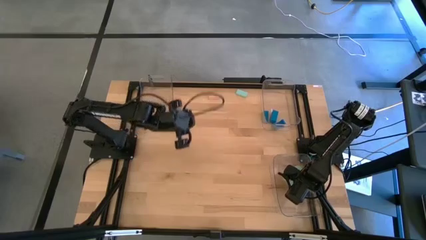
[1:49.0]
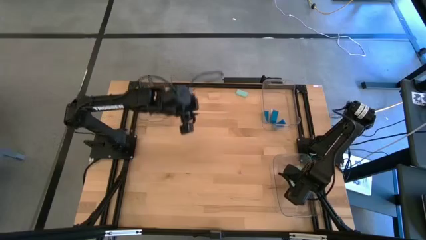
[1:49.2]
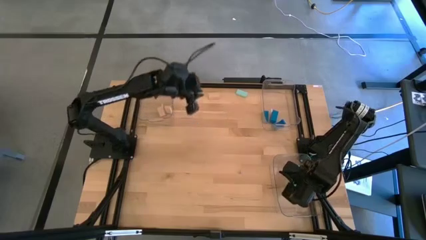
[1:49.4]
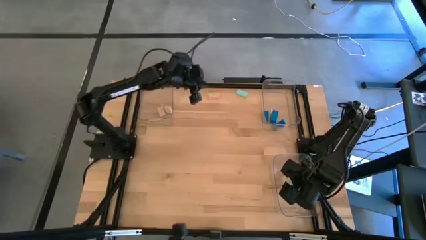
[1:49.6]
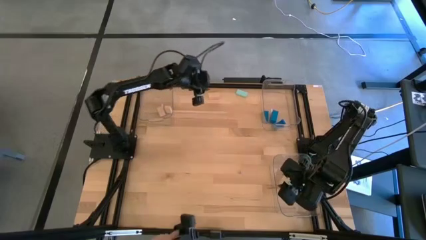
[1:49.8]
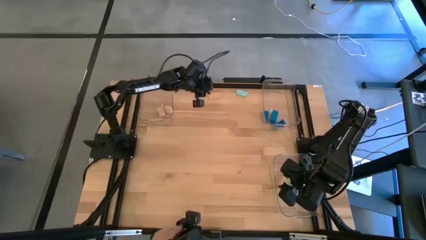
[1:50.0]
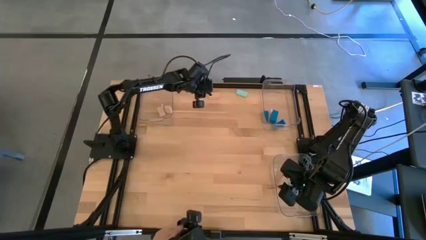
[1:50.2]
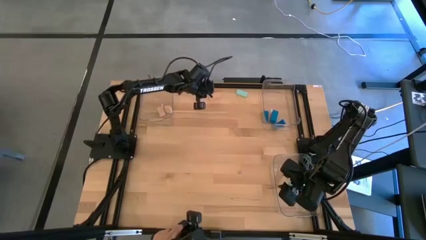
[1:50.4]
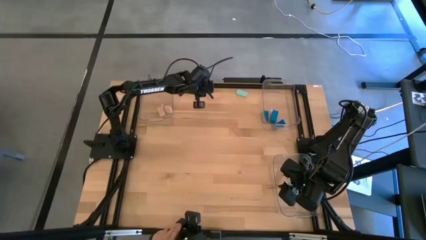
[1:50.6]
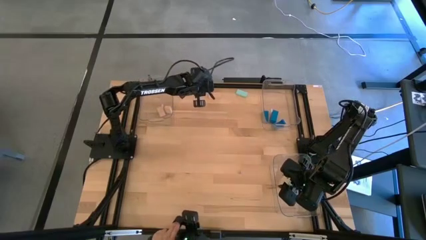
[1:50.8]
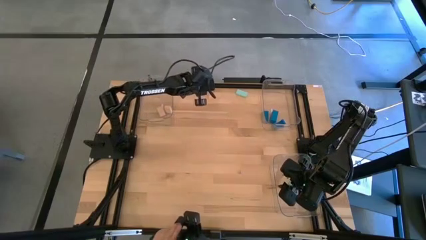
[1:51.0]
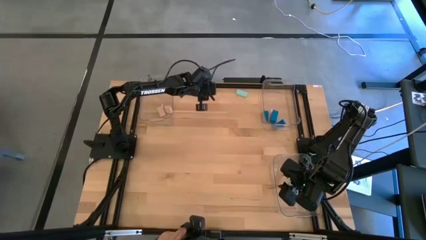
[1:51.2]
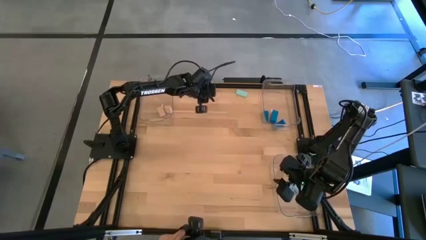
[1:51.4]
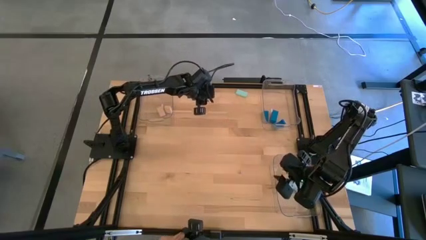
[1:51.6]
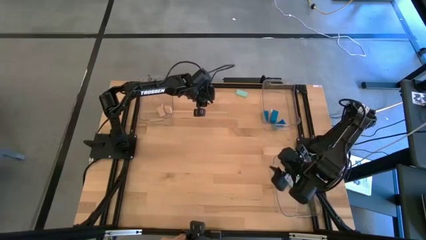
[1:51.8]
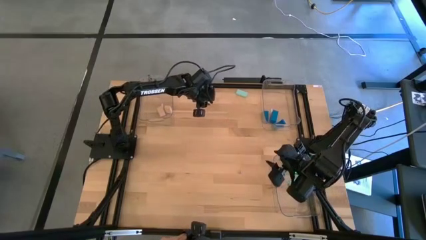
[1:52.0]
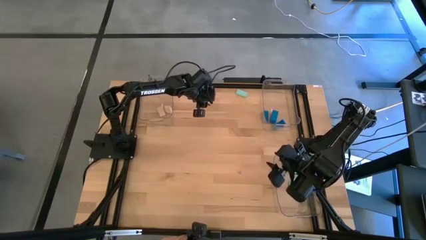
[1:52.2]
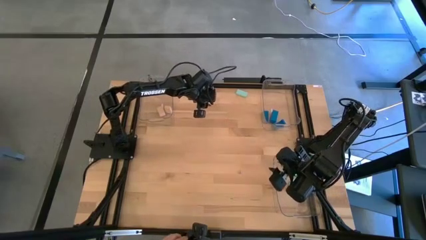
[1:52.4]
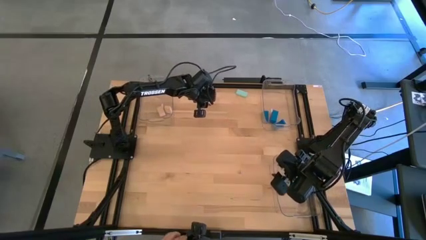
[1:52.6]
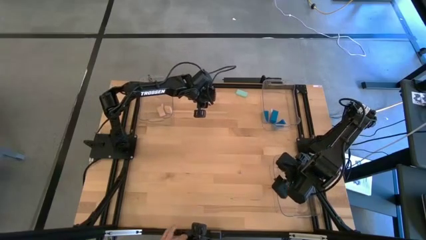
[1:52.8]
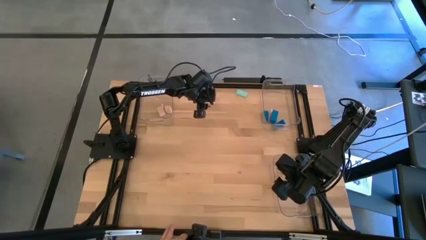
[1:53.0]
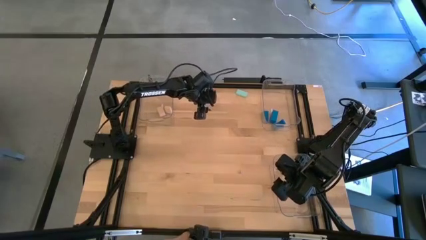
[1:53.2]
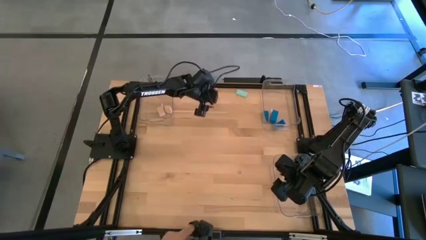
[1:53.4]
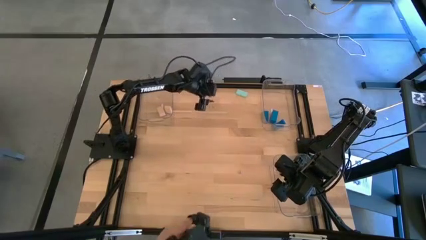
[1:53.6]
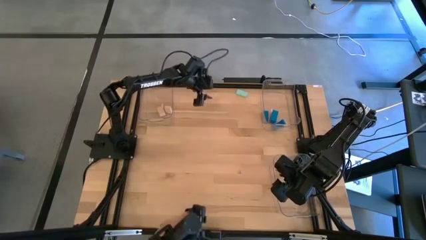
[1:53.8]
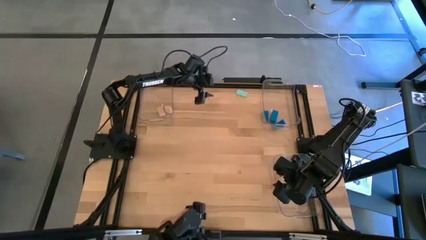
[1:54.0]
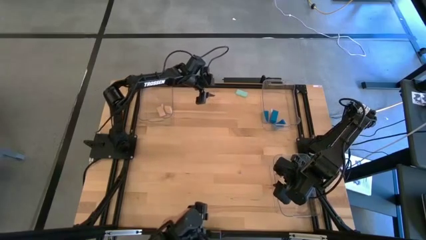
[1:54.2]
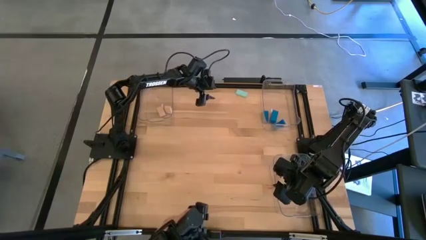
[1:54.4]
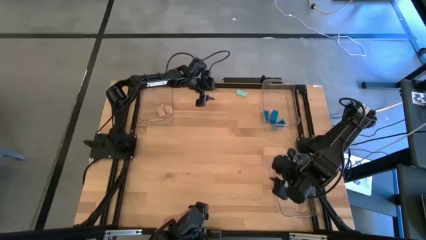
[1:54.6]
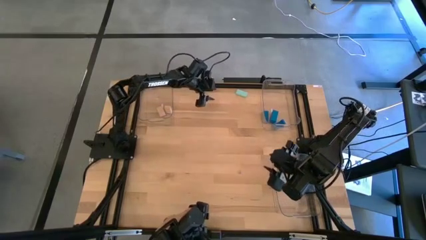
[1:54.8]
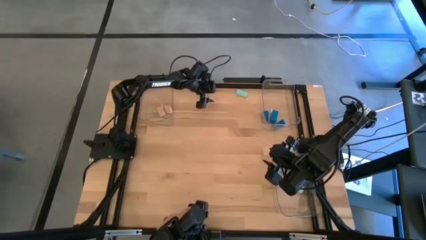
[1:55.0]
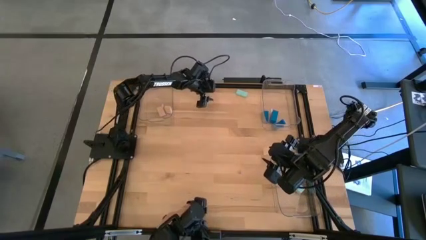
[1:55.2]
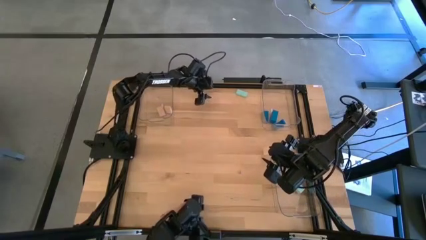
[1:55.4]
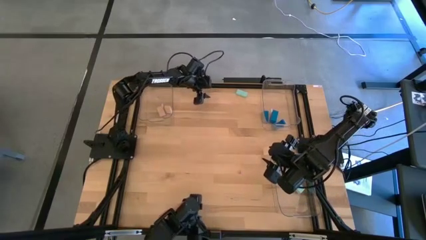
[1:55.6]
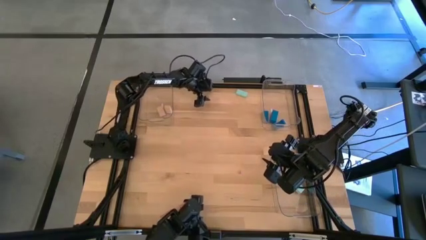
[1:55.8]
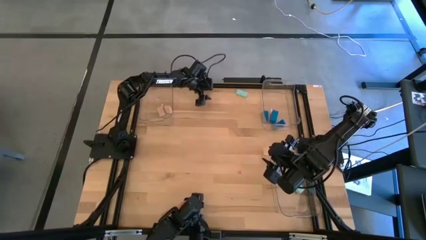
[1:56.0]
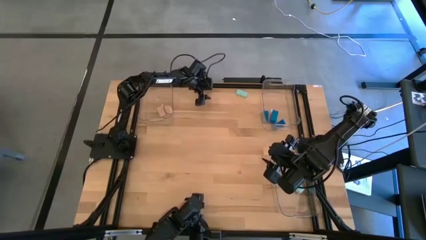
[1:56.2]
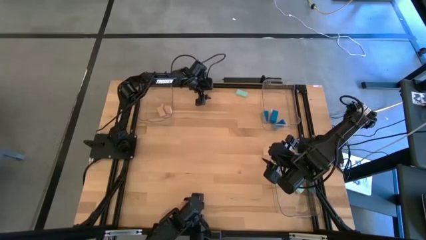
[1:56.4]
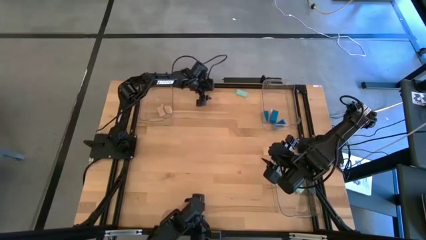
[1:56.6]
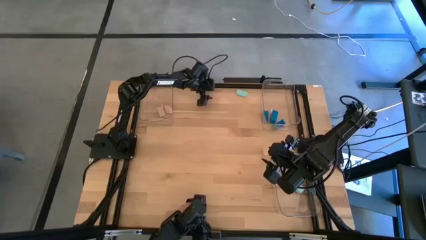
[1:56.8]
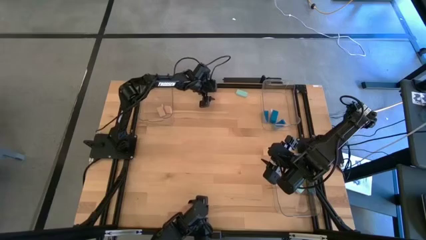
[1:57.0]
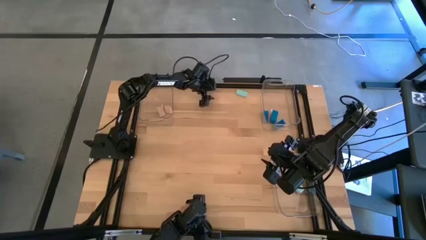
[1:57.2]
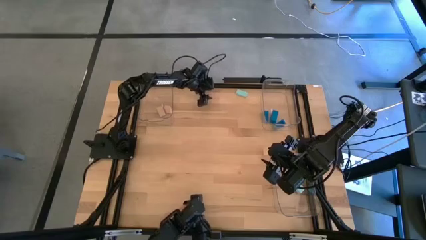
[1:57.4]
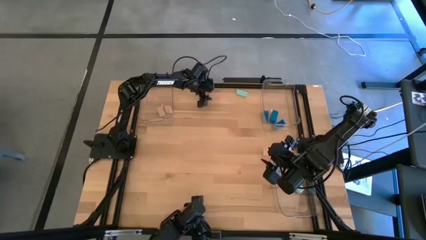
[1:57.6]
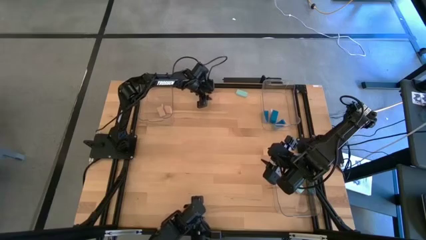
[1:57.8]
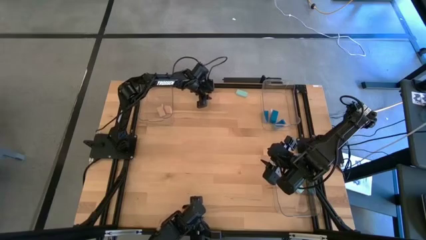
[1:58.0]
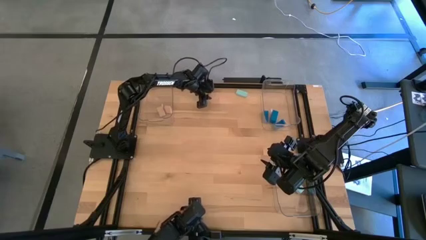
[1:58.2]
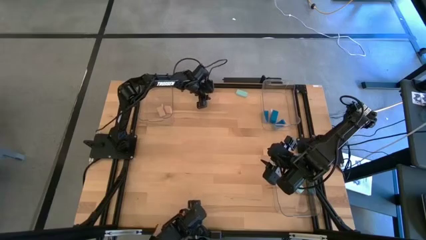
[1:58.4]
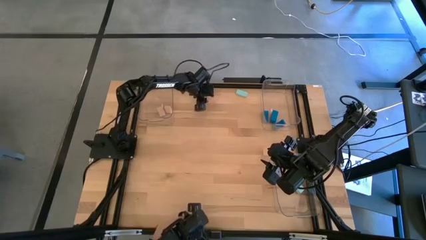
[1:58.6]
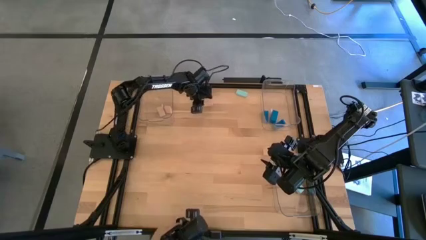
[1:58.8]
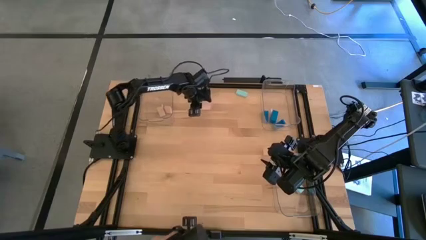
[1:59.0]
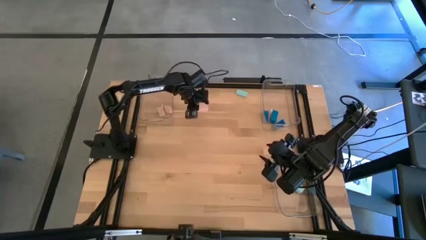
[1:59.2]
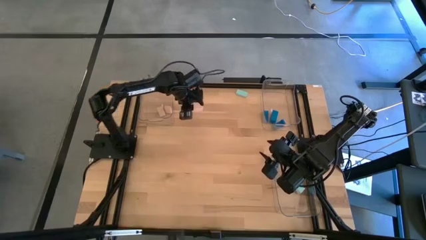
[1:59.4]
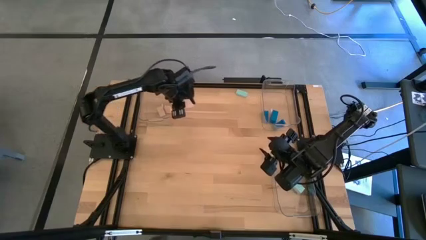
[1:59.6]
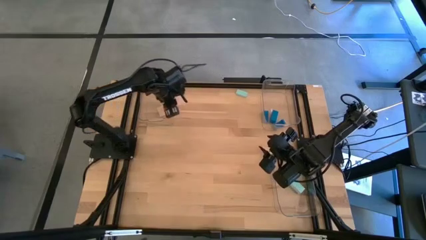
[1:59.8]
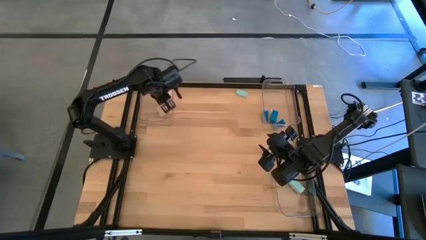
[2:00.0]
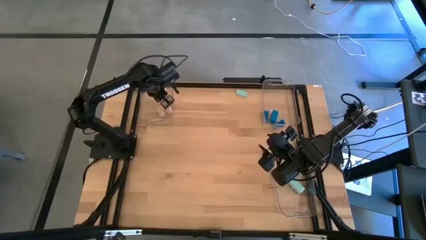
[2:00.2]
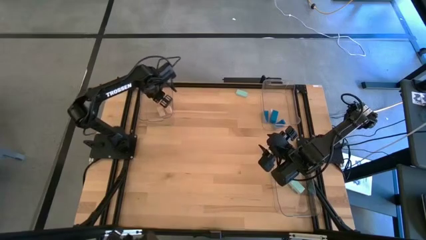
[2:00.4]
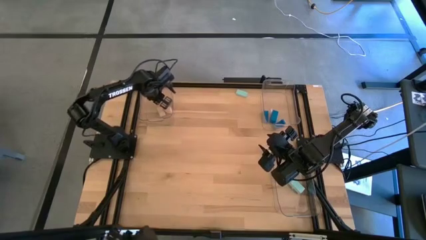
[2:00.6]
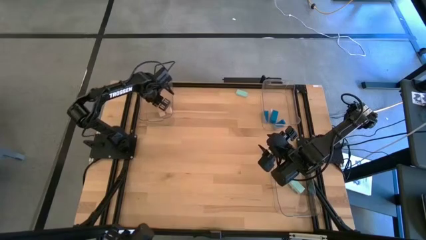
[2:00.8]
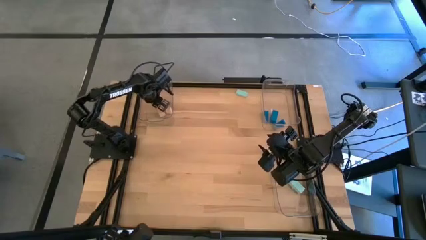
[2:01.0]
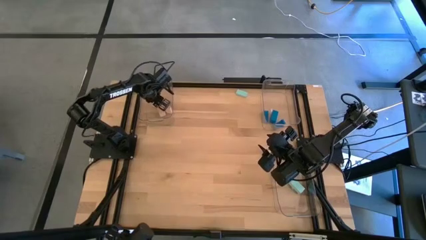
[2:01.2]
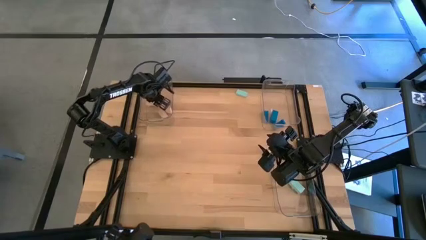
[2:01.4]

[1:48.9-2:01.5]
Task: Sort & place blocks by color
Put the brown block into the top left transparent bin

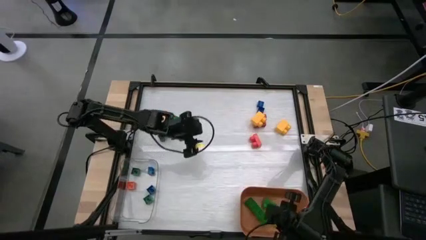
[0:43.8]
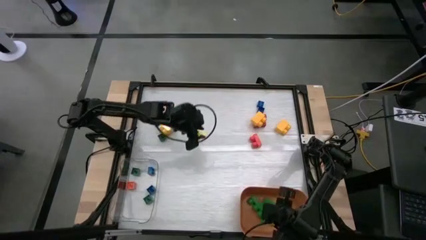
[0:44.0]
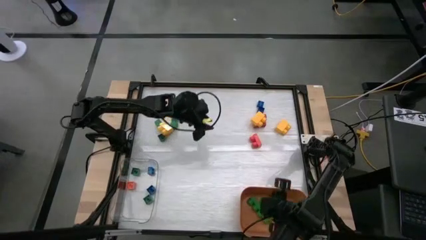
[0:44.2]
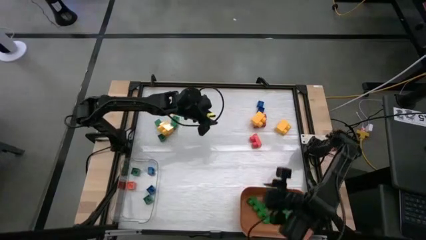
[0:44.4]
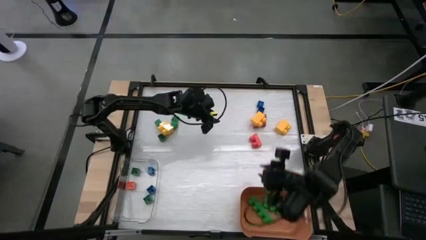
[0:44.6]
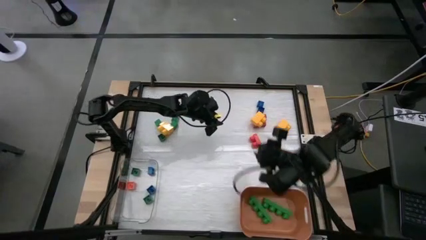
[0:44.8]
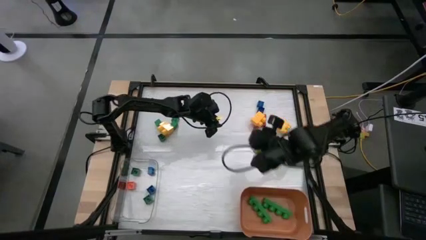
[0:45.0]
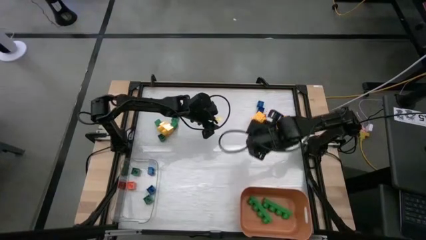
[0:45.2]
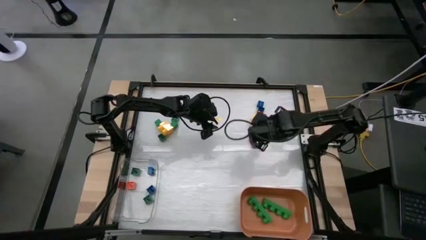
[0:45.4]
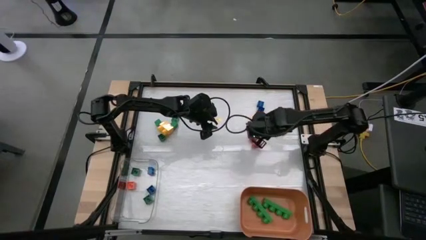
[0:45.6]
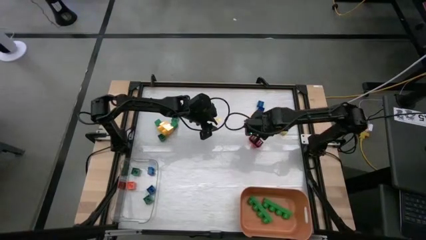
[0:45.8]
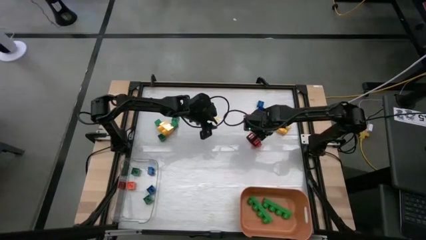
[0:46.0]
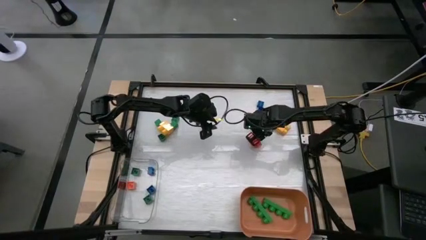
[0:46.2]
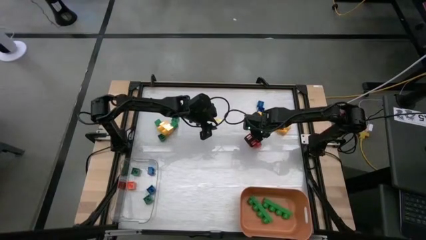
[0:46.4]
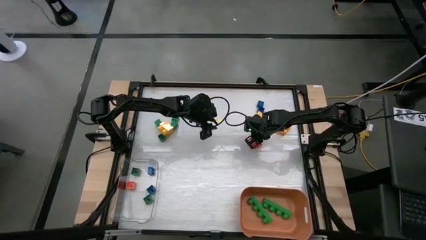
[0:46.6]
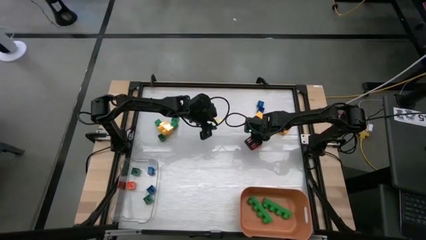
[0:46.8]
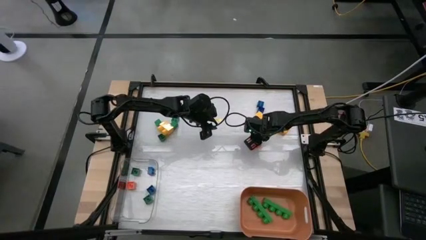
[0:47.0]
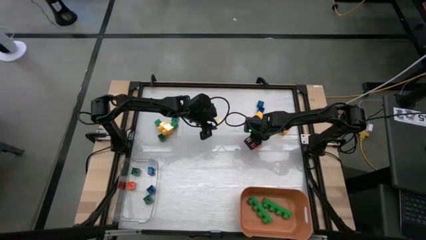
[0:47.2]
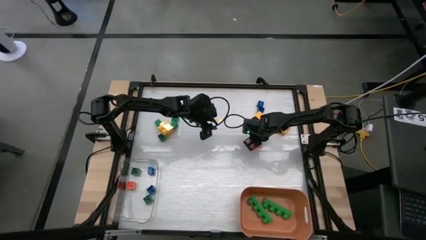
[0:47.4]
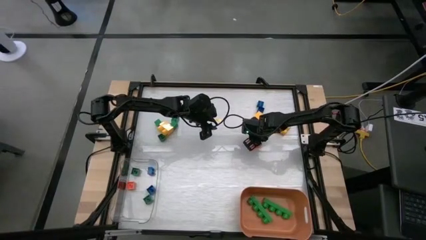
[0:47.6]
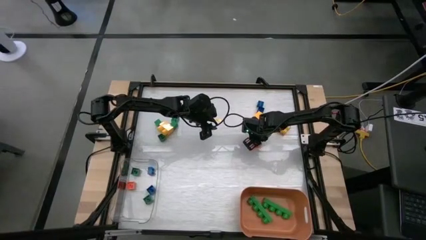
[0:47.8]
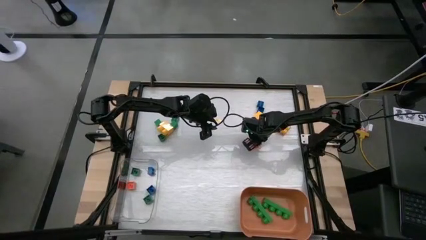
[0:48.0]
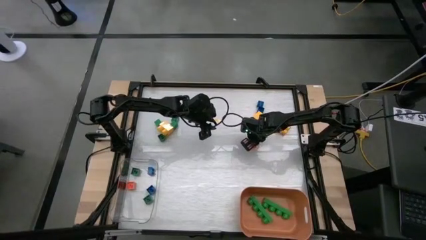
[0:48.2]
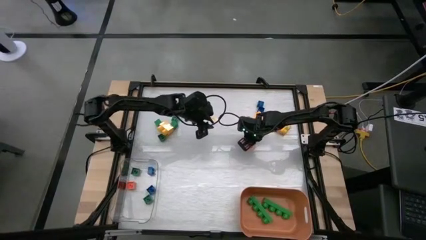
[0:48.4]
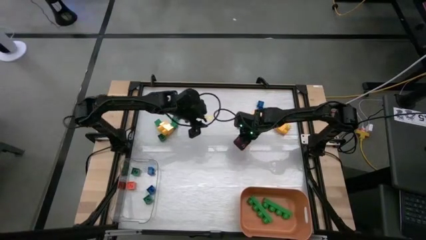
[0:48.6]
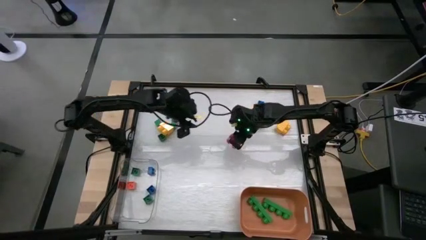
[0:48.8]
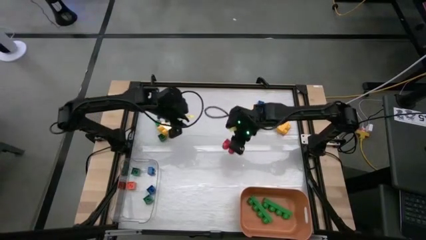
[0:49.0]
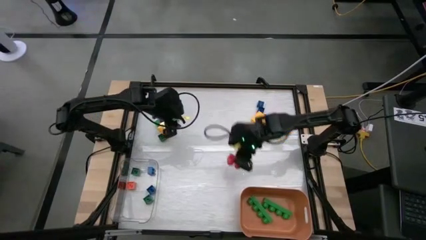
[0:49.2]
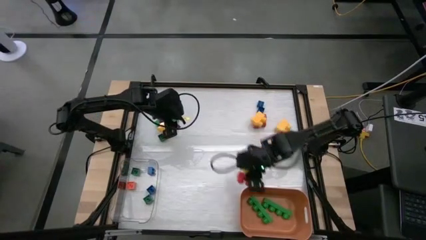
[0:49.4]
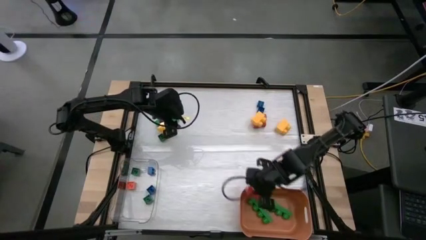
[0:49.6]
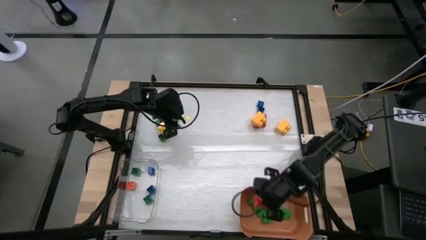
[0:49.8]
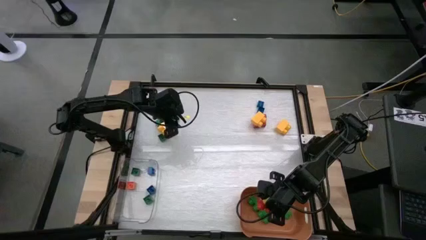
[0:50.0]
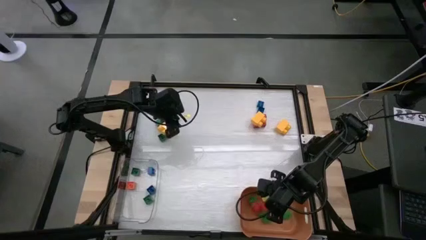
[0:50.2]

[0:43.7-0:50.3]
Task: Sort blocks by size
Put the big red game piece into the orange bin
